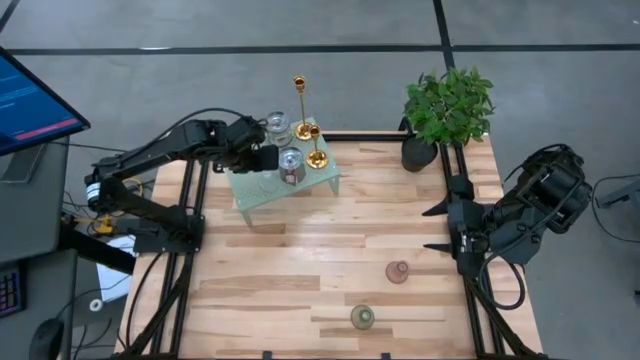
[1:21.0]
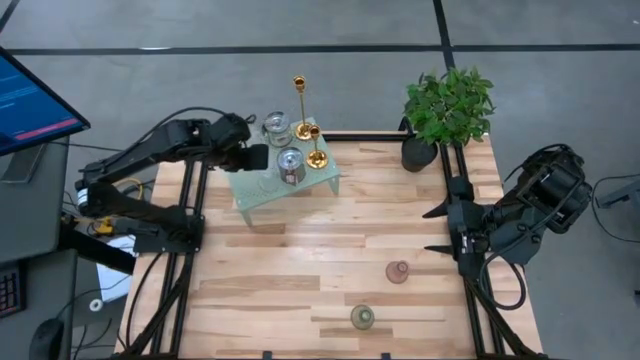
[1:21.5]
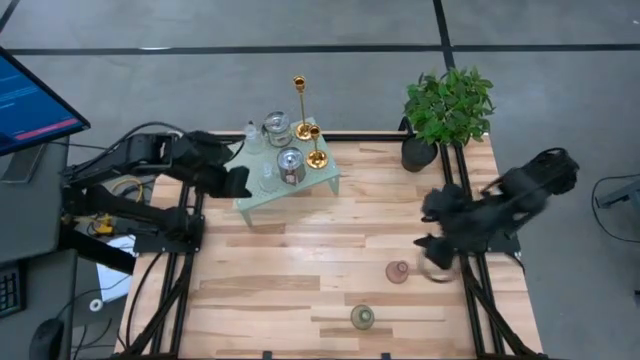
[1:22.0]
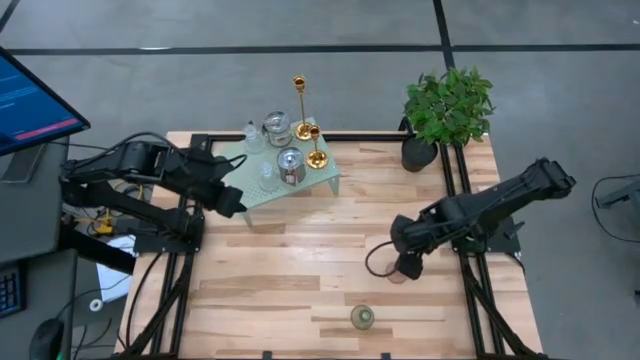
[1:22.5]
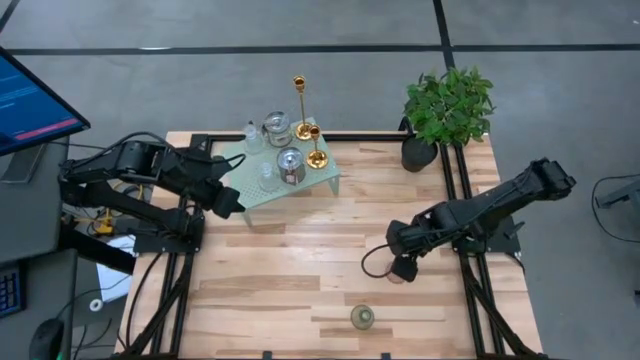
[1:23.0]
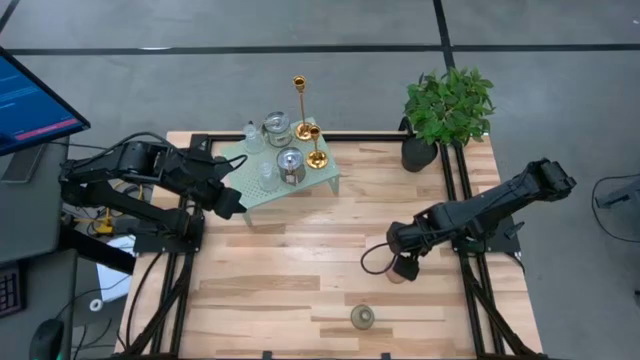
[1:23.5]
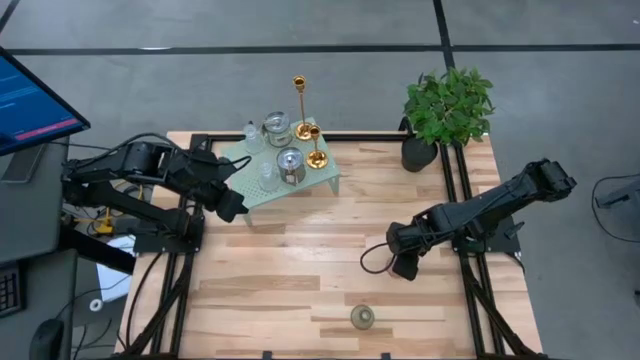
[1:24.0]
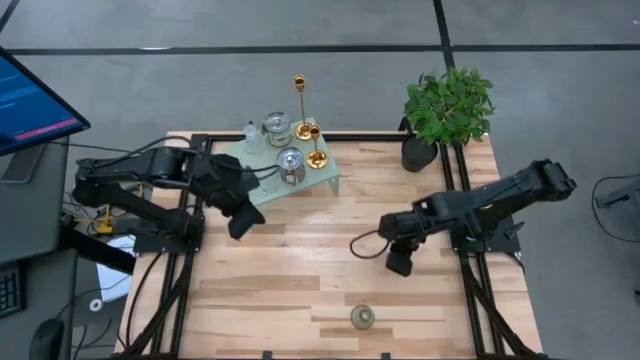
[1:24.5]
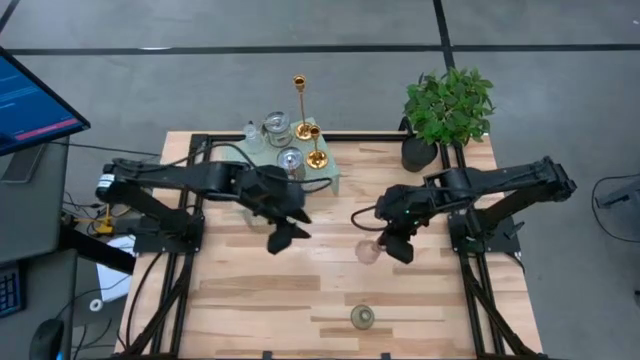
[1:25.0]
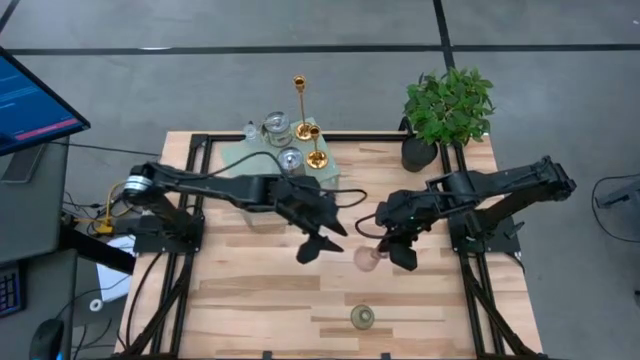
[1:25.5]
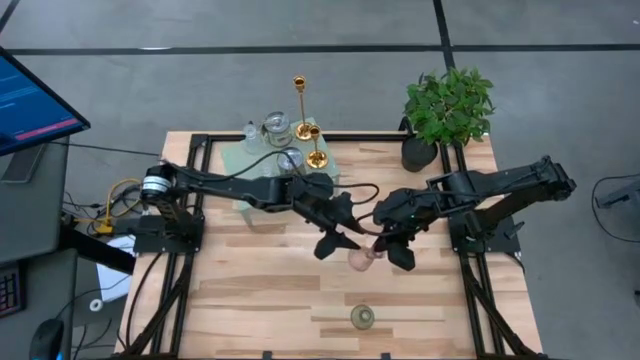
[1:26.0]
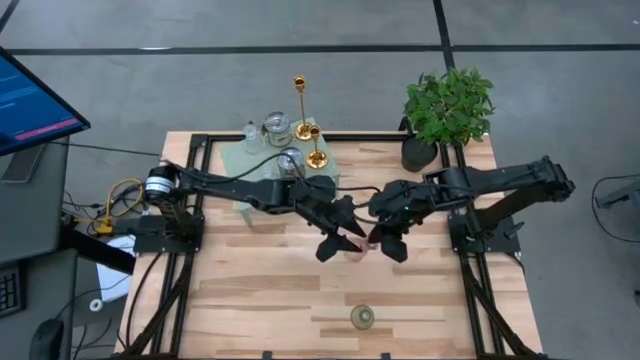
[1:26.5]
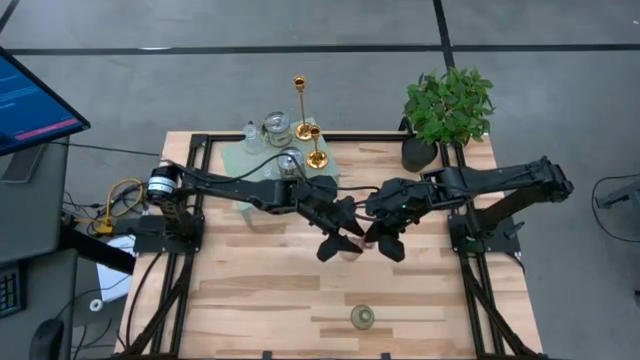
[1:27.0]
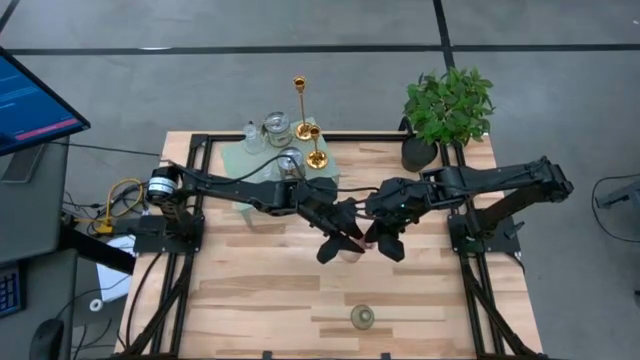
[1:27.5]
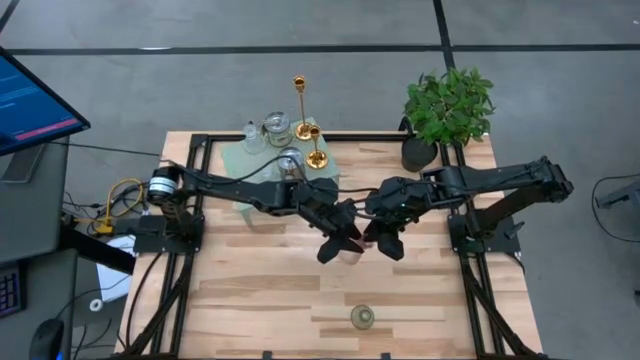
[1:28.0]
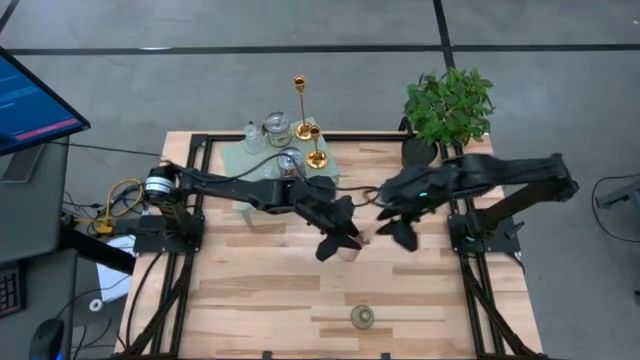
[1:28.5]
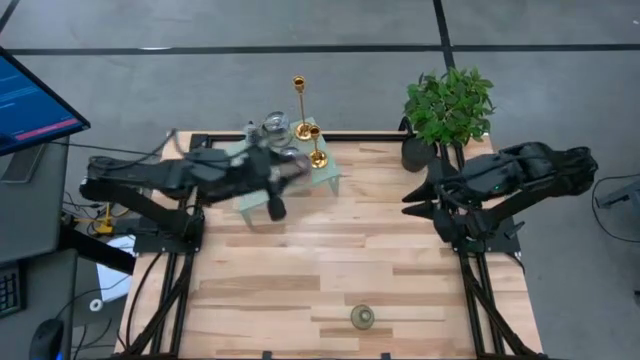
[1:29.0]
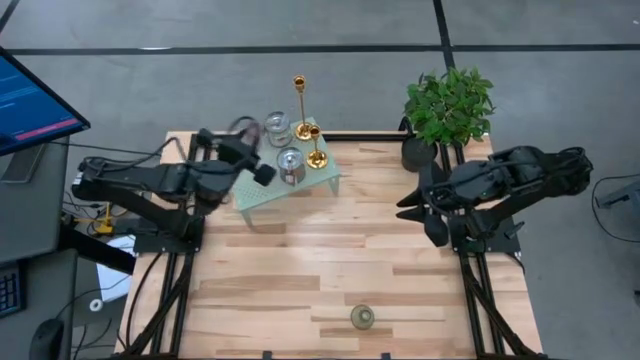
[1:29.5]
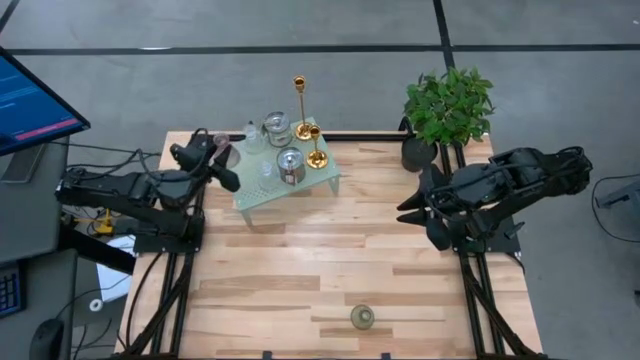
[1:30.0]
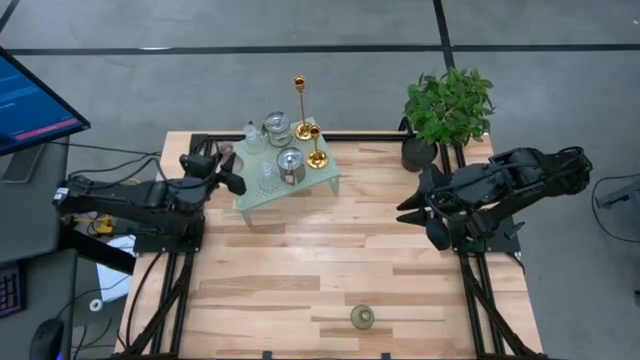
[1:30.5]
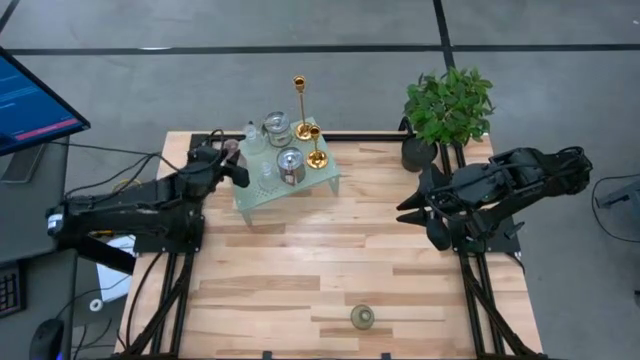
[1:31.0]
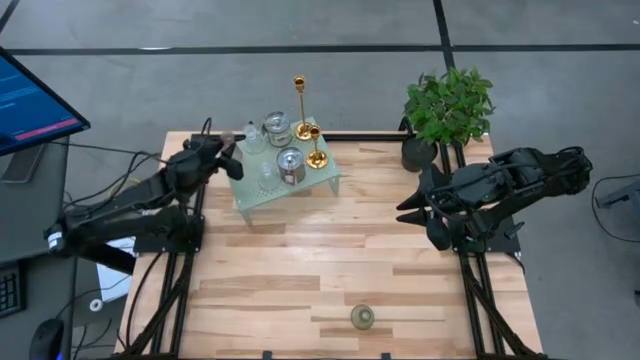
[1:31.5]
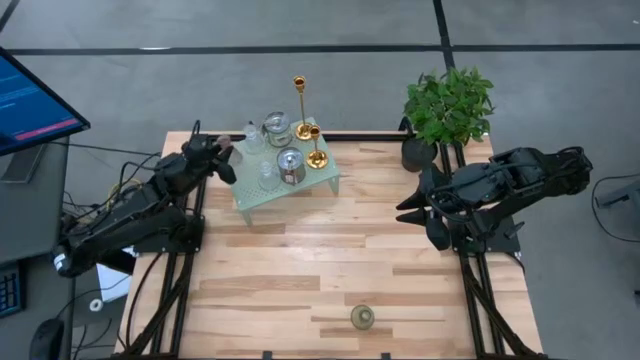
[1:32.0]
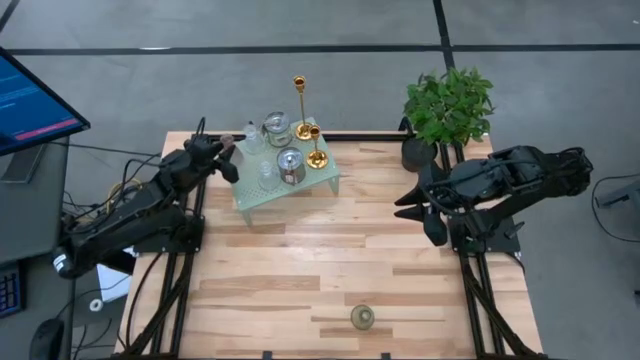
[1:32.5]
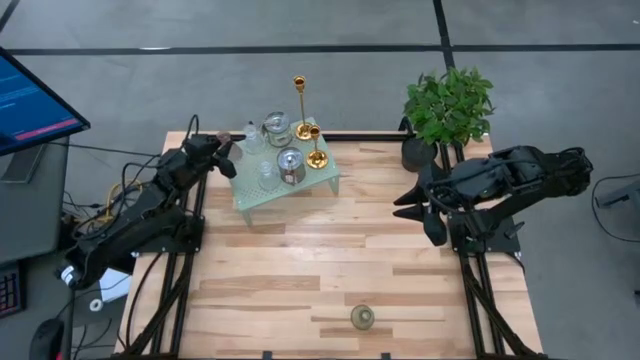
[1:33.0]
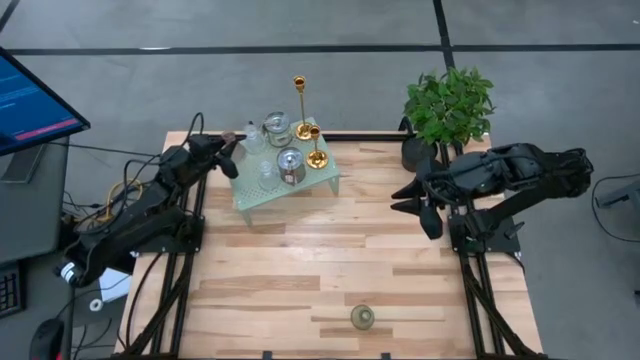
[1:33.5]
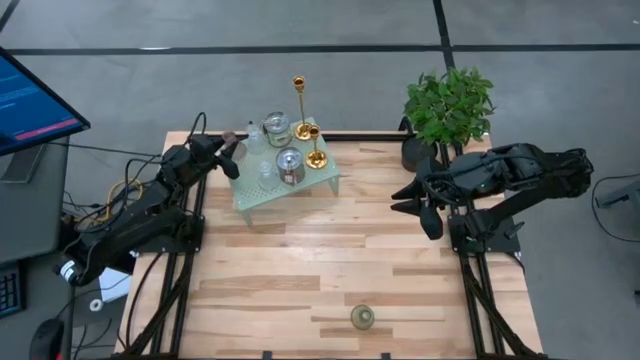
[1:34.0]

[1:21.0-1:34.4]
Task: Pick & Place candle stick holders
Put the pink candle holder on the shelf

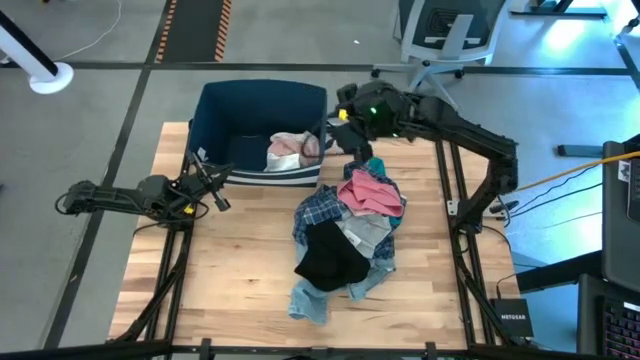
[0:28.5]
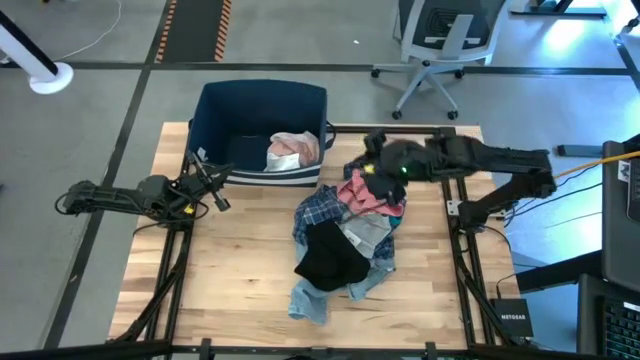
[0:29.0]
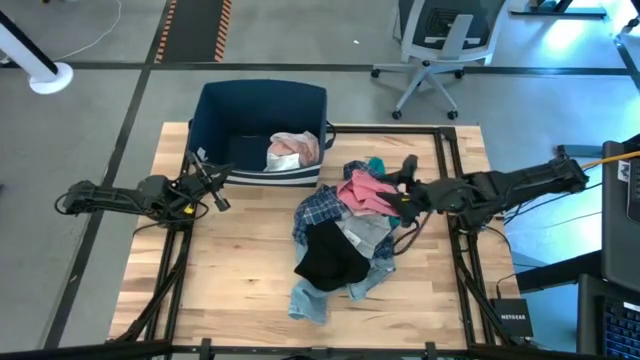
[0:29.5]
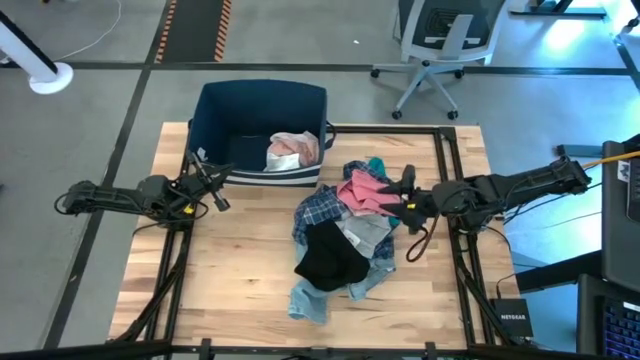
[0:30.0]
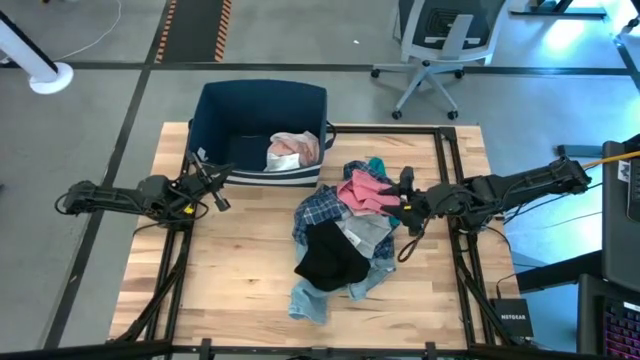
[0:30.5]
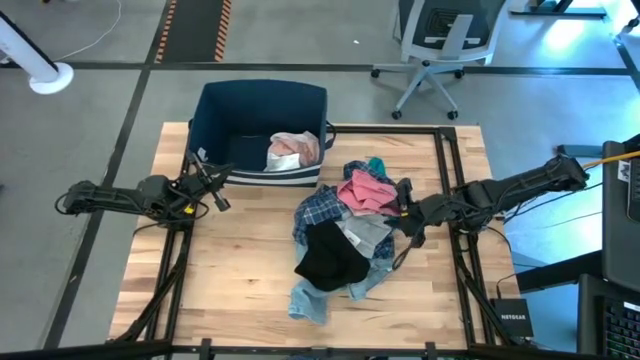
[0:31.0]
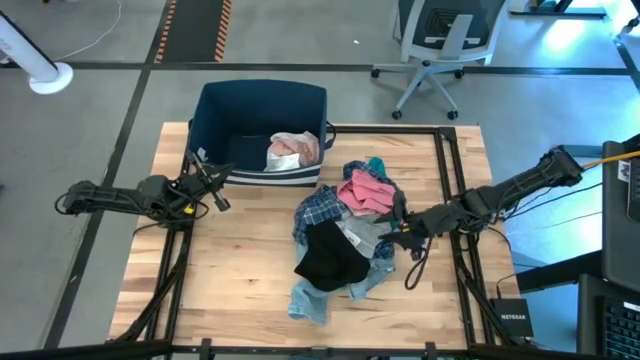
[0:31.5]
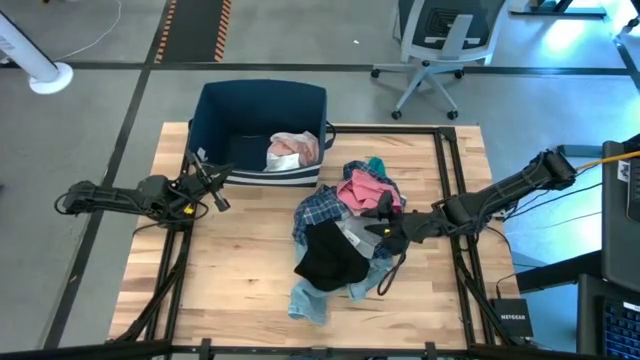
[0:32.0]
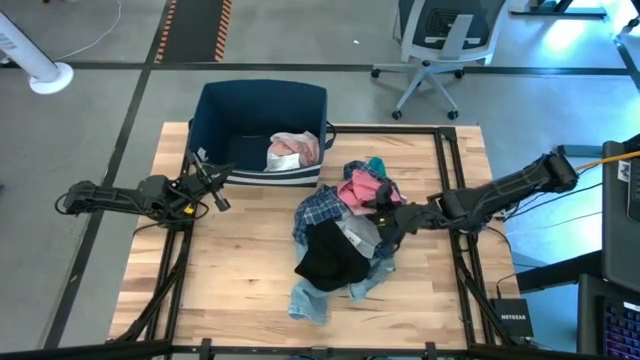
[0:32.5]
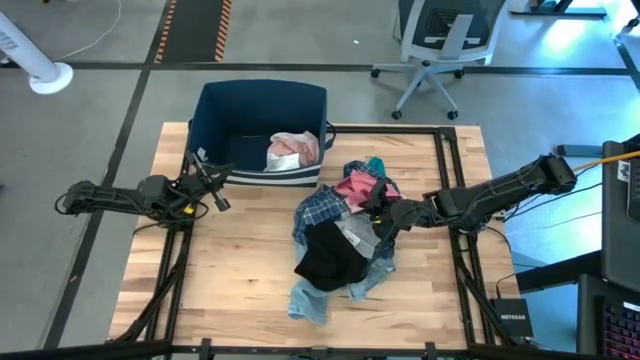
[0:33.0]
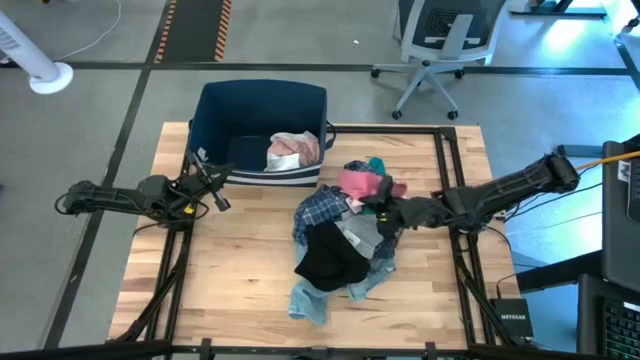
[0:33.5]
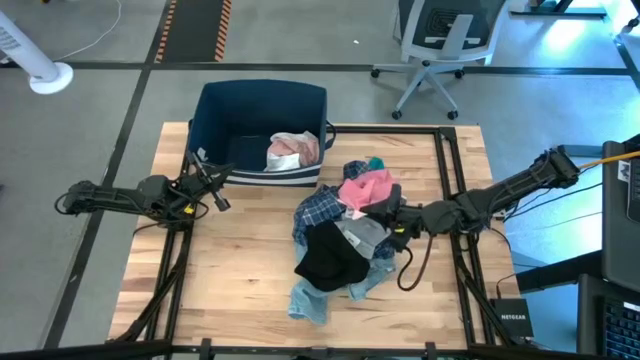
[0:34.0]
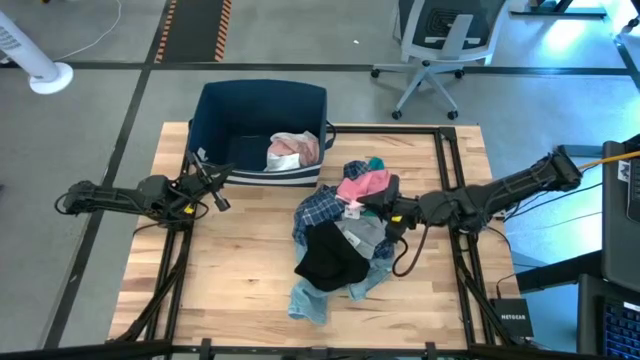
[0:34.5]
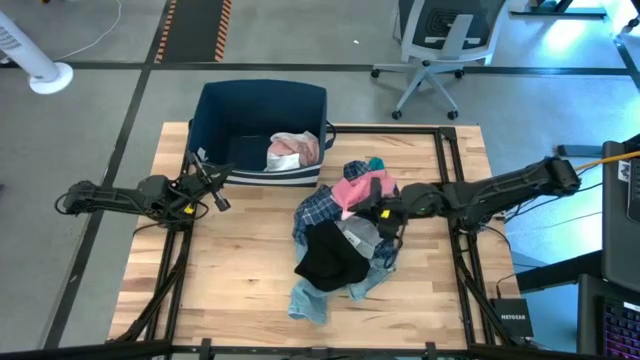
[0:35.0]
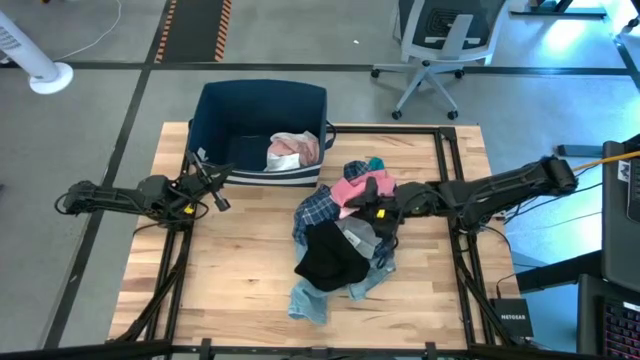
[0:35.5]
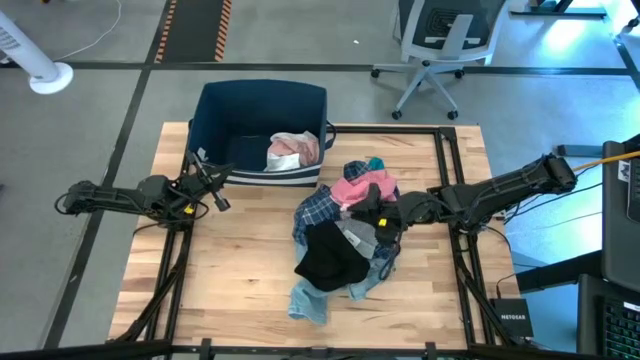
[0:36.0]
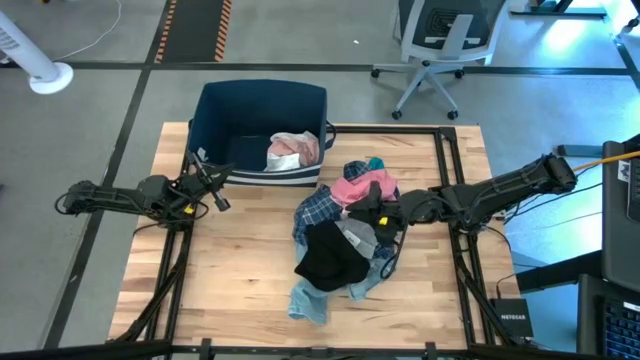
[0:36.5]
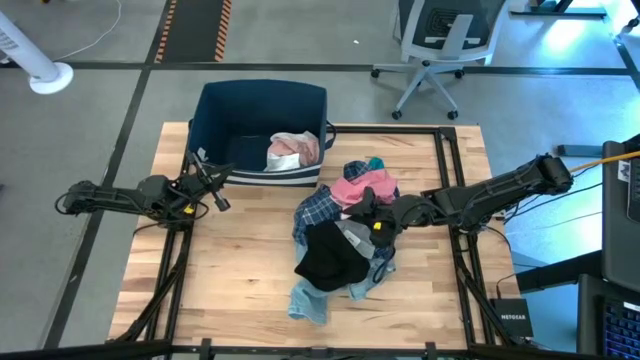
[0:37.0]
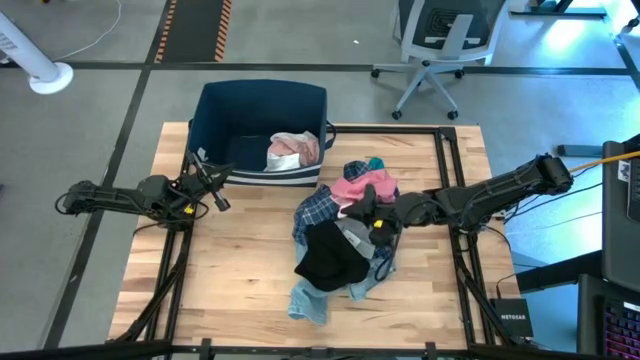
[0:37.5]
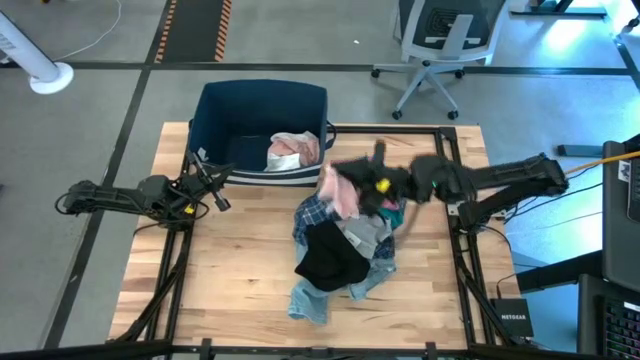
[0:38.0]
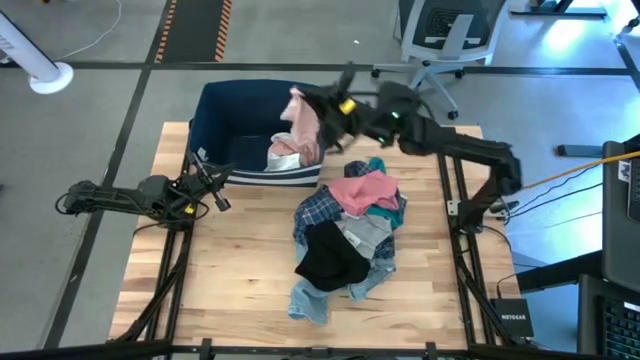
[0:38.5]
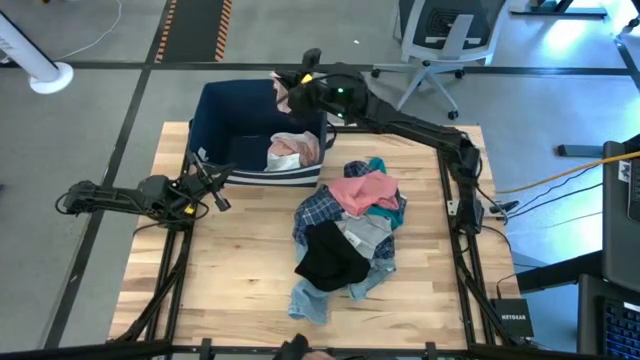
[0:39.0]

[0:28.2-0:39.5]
Task: Sort clothes
Put the pink sock into the blue laundry bin
